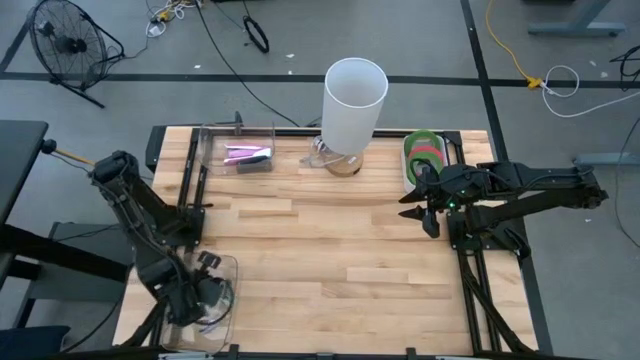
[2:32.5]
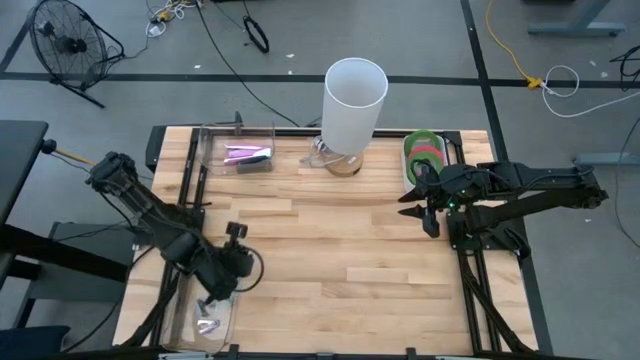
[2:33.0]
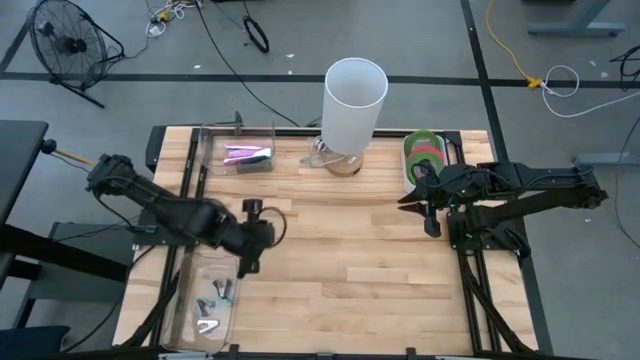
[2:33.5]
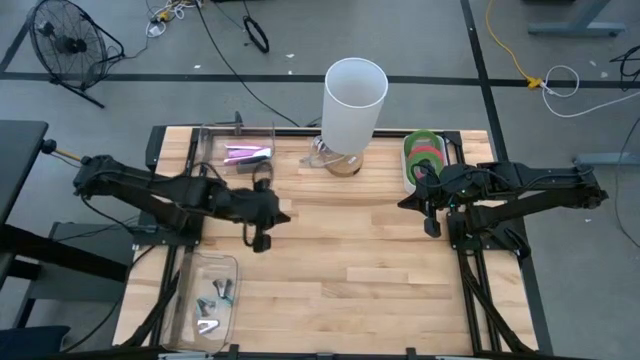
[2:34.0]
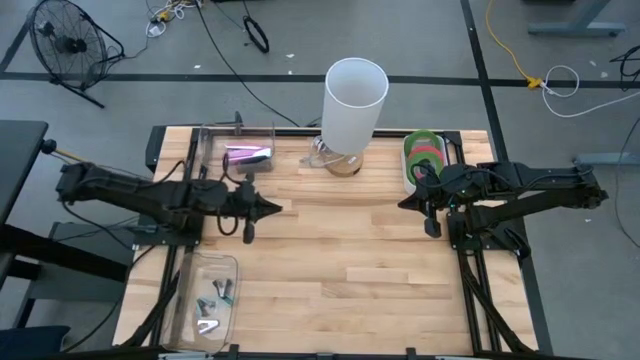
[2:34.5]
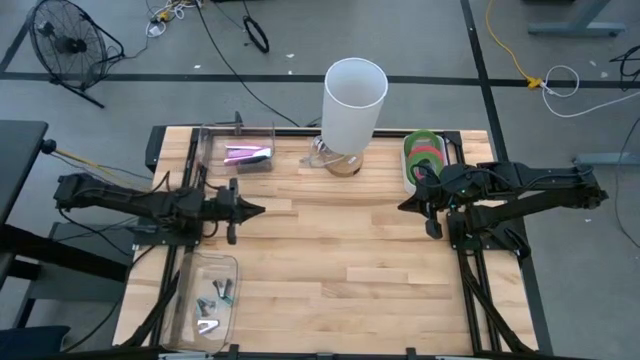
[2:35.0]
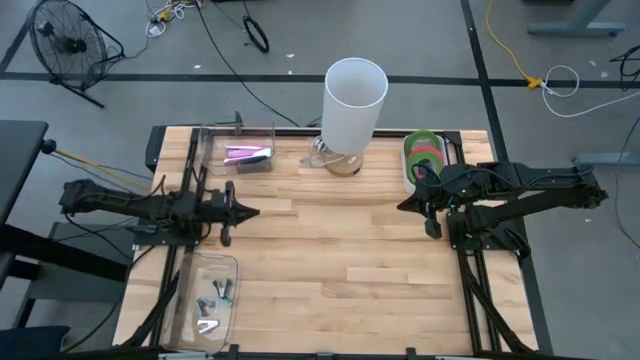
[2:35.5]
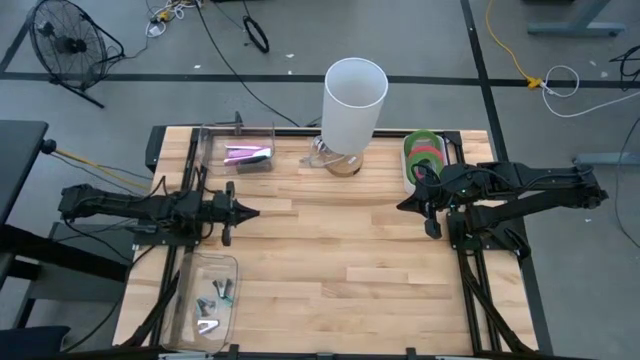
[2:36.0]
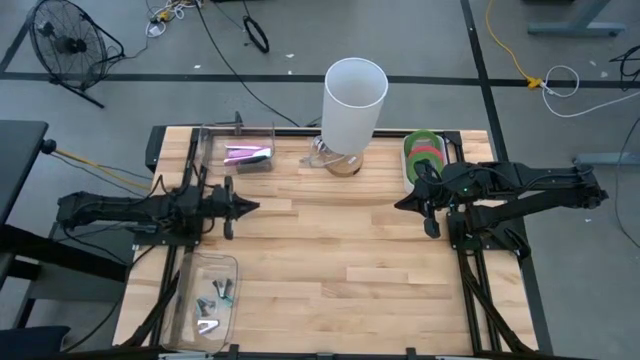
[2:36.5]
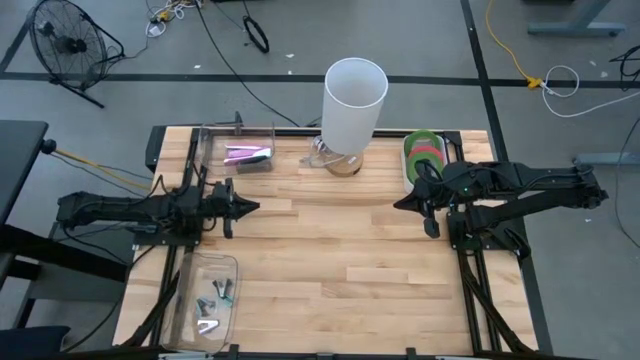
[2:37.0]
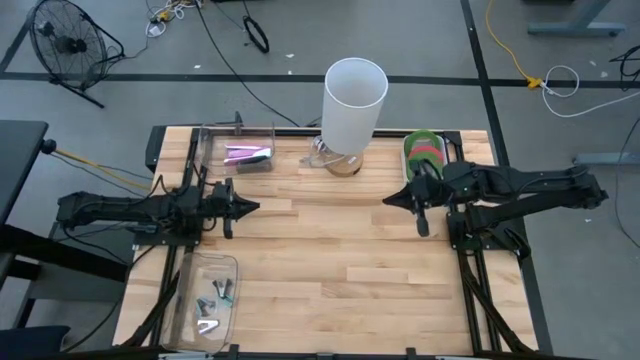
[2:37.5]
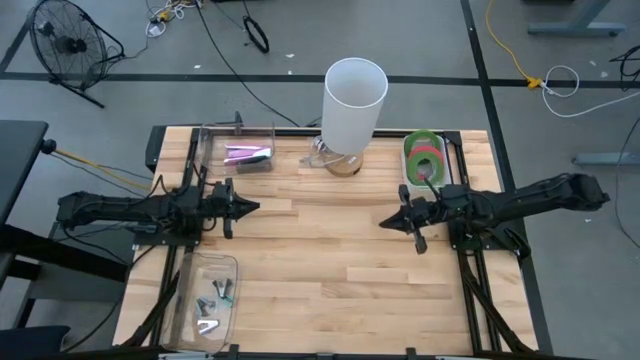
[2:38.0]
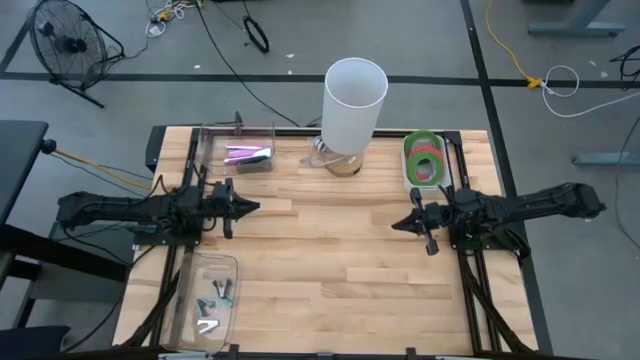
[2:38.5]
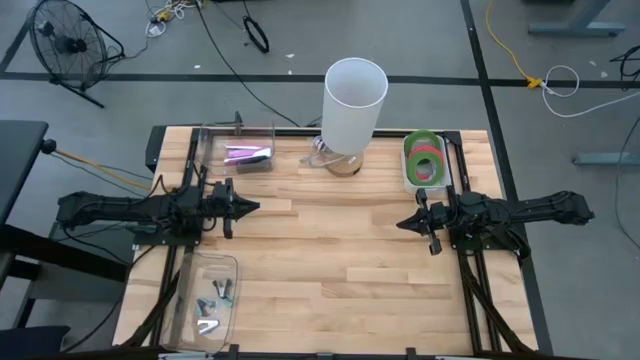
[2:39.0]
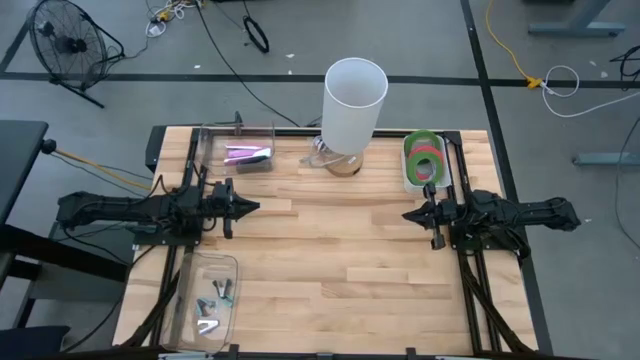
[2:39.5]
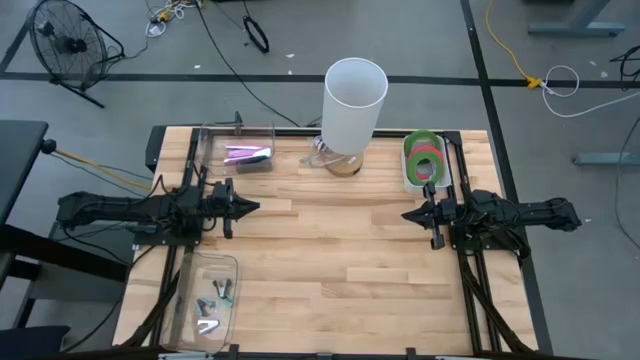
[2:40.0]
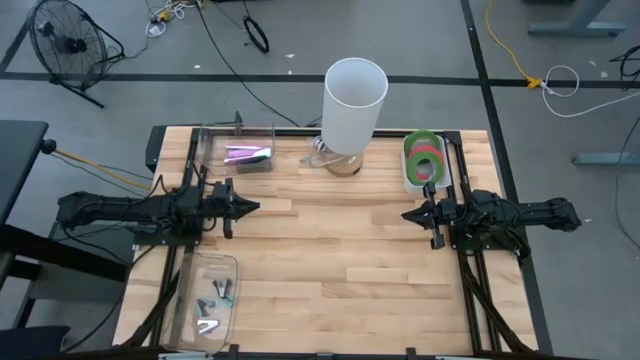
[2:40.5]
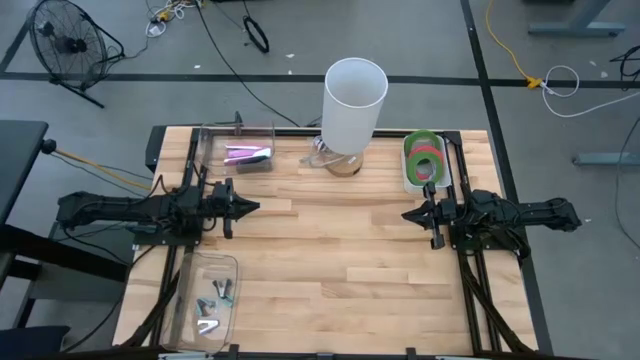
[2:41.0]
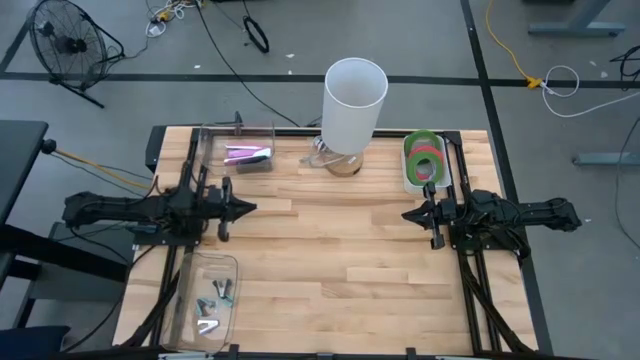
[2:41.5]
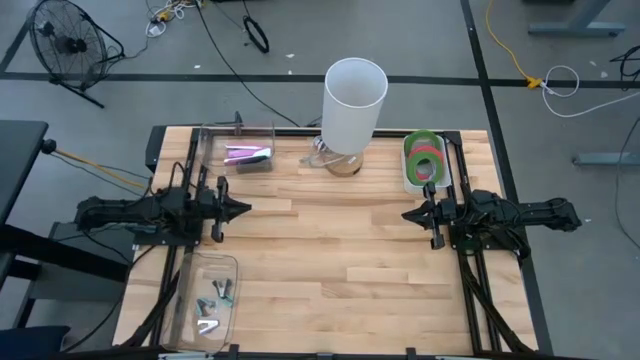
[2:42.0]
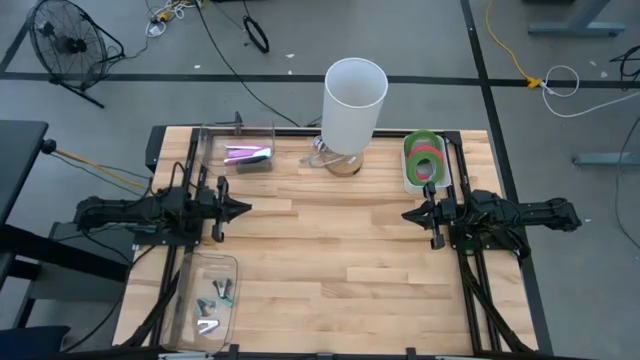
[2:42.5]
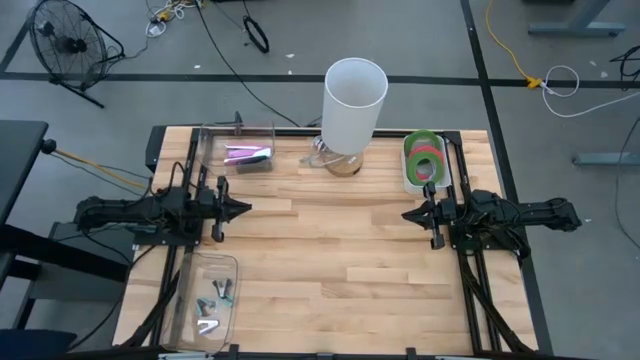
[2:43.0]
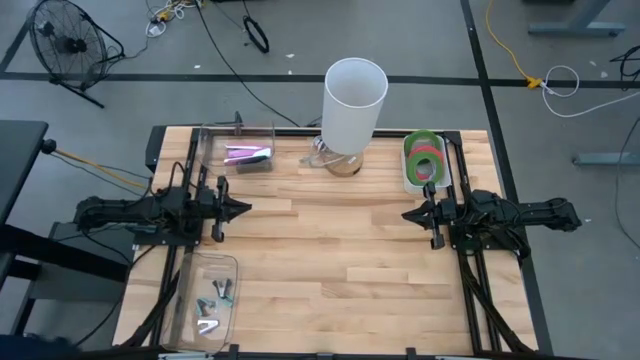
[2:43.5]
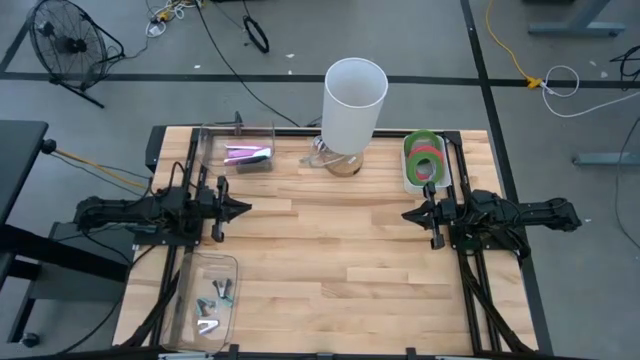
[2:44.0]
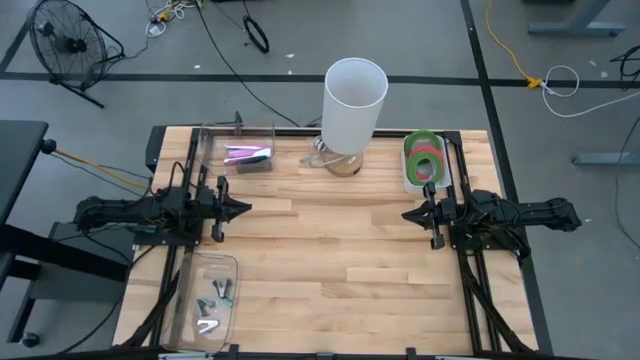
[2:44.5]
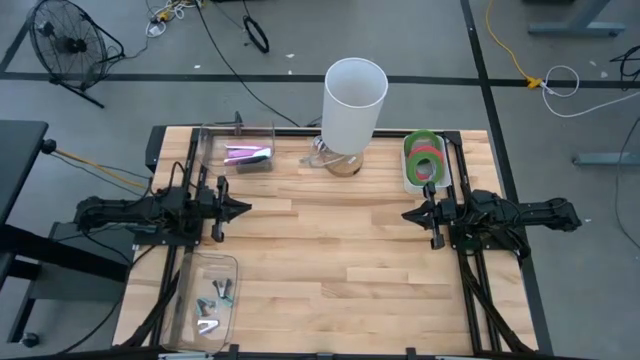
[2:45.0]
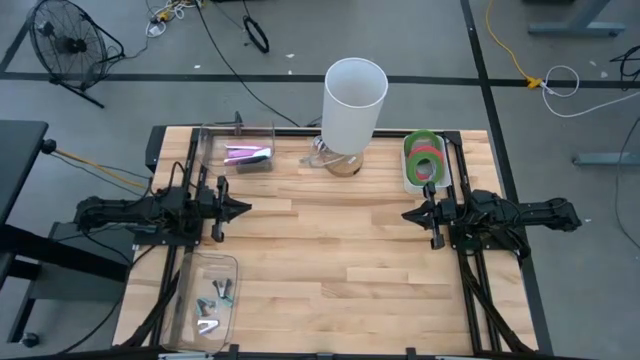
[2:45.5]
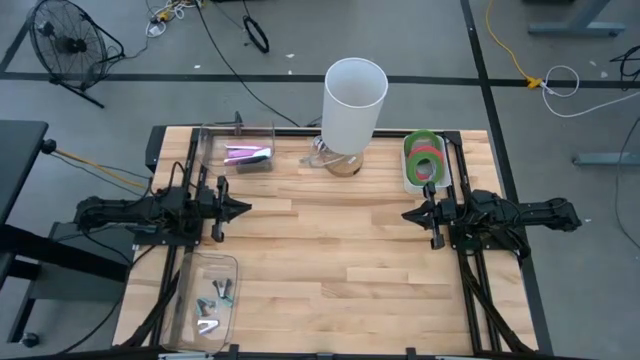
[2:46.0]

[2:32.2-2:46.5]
Task: Pick and place Stapler, Stapler remover, tape
Return to Home Position
